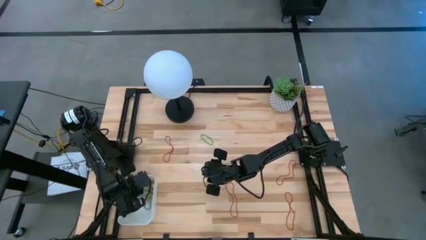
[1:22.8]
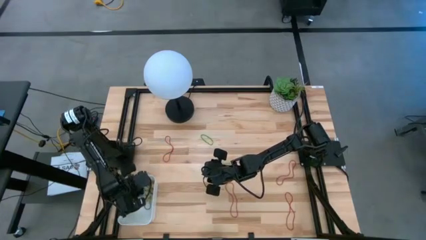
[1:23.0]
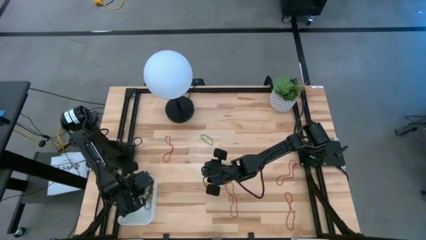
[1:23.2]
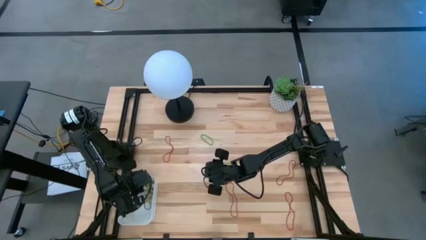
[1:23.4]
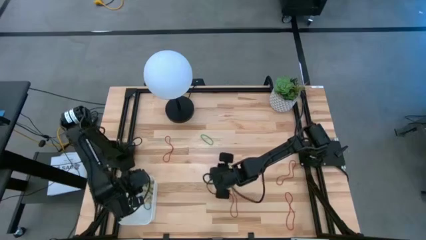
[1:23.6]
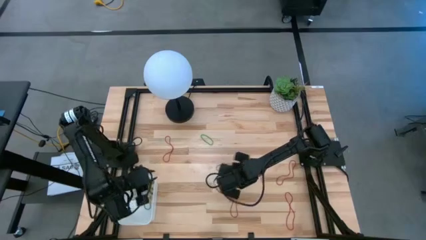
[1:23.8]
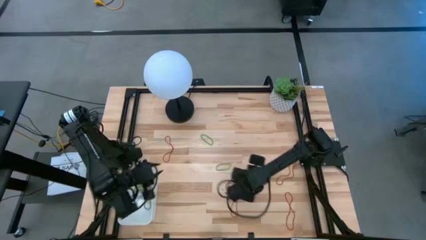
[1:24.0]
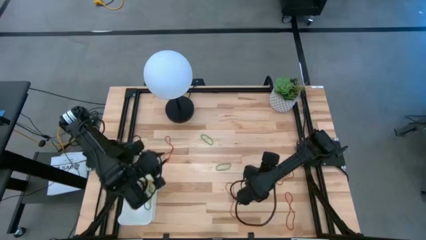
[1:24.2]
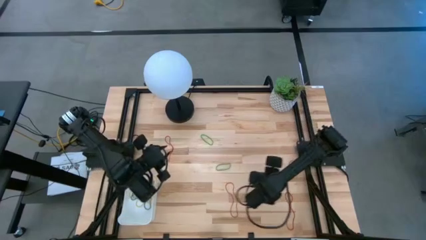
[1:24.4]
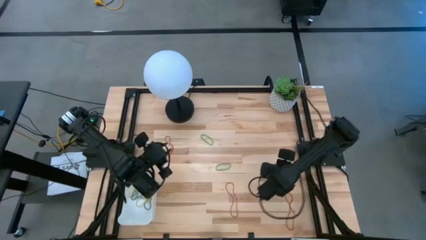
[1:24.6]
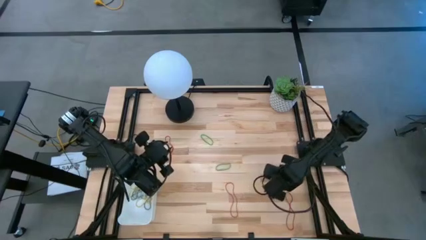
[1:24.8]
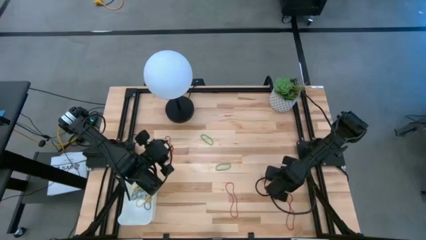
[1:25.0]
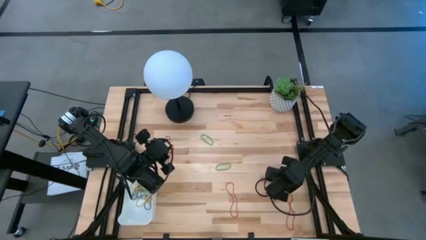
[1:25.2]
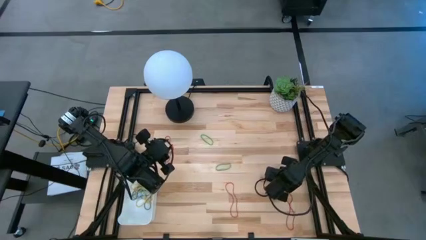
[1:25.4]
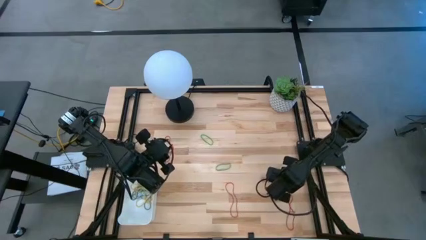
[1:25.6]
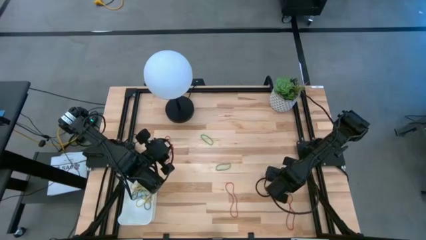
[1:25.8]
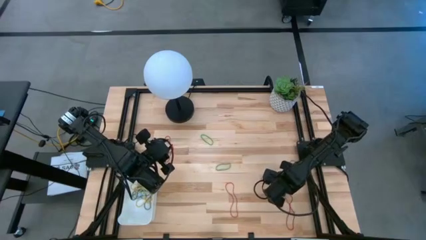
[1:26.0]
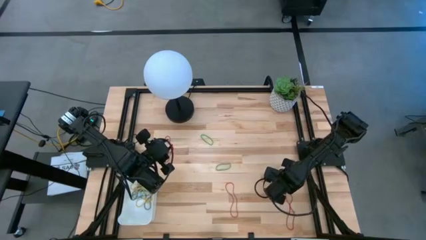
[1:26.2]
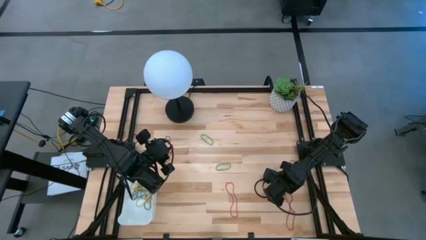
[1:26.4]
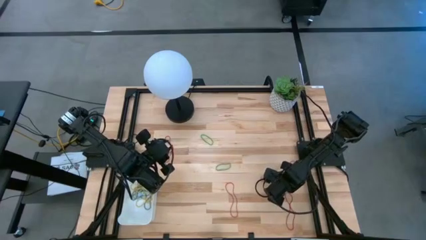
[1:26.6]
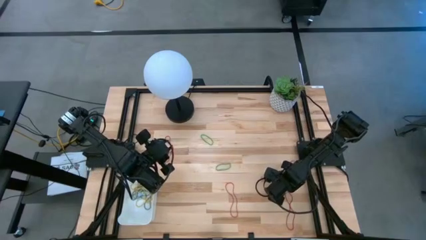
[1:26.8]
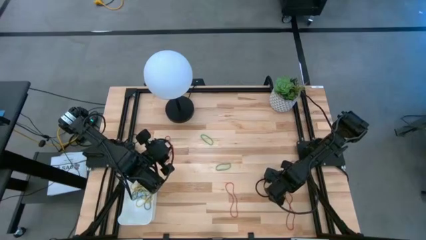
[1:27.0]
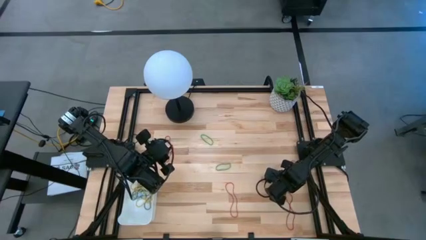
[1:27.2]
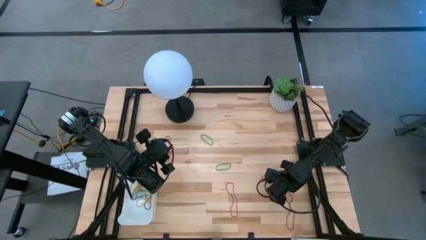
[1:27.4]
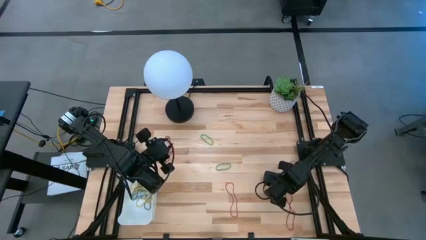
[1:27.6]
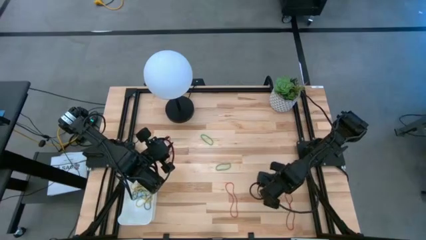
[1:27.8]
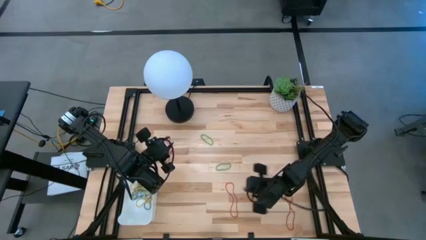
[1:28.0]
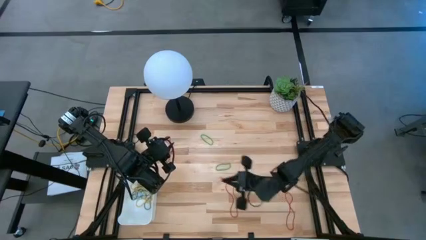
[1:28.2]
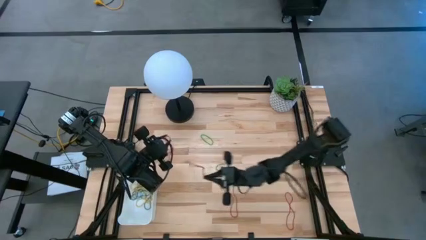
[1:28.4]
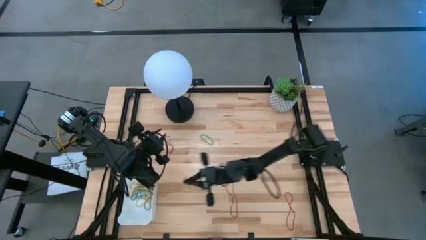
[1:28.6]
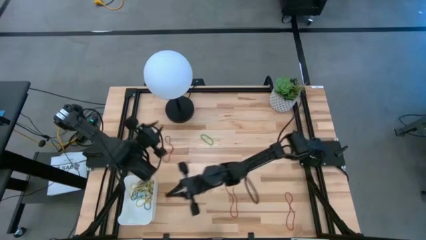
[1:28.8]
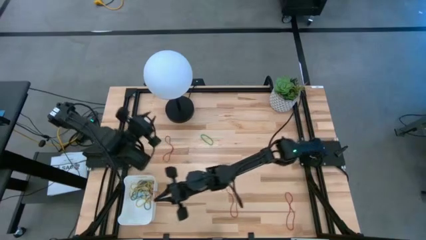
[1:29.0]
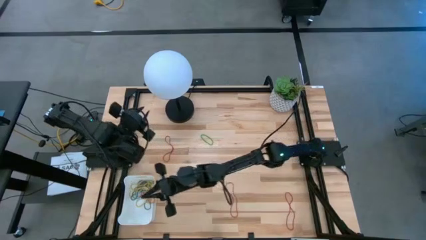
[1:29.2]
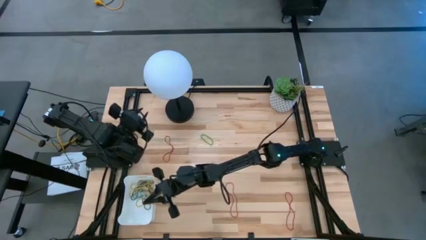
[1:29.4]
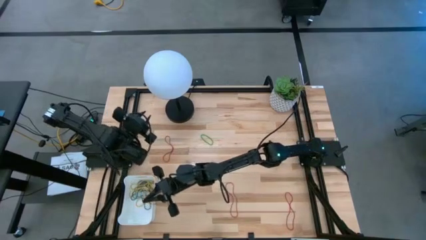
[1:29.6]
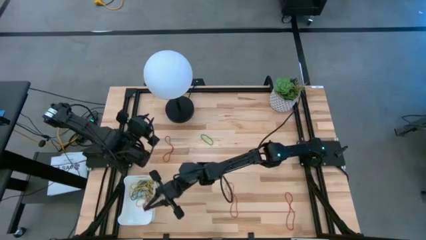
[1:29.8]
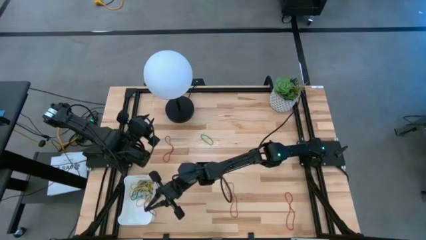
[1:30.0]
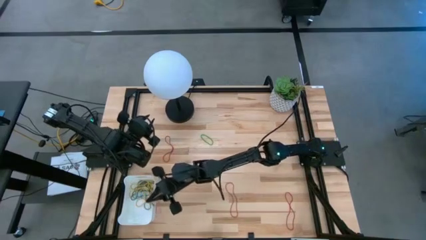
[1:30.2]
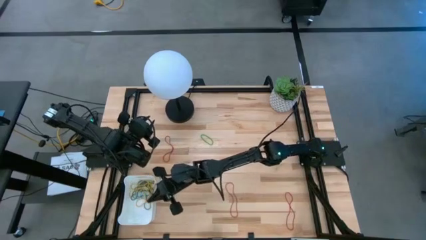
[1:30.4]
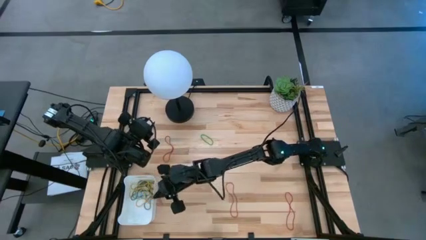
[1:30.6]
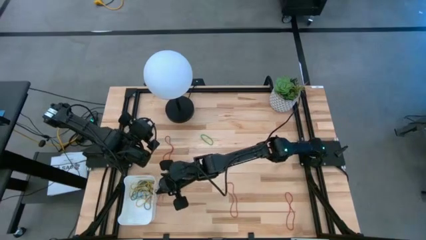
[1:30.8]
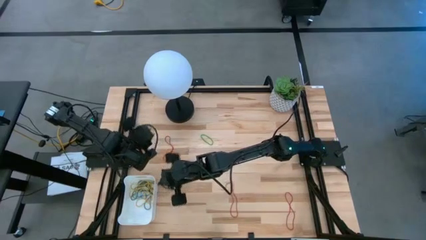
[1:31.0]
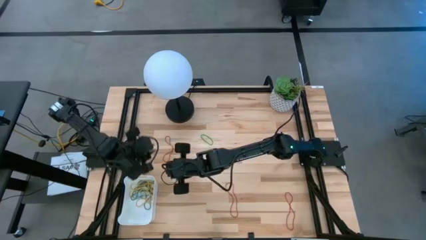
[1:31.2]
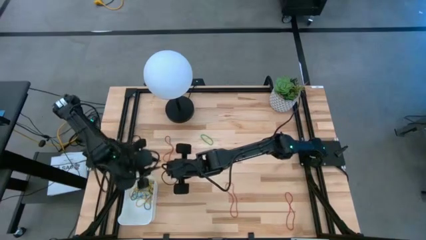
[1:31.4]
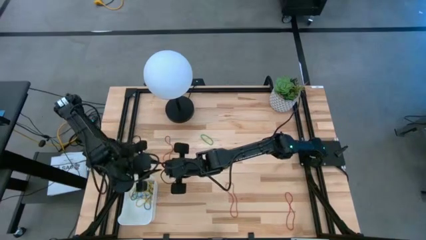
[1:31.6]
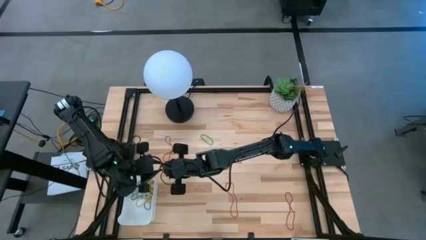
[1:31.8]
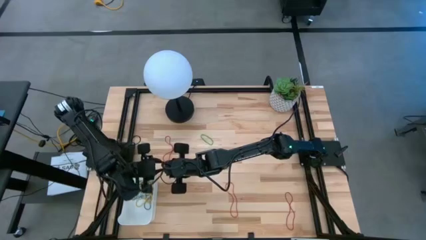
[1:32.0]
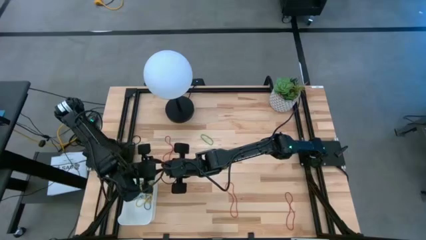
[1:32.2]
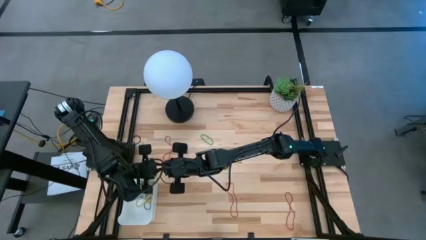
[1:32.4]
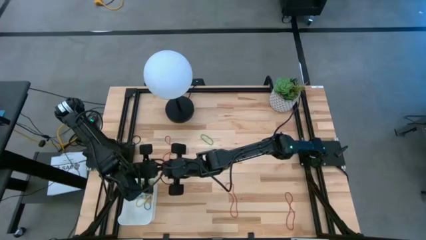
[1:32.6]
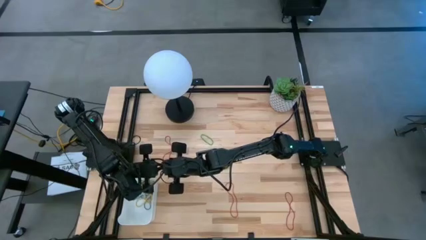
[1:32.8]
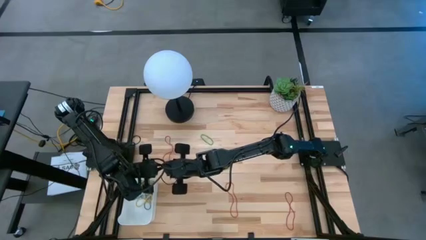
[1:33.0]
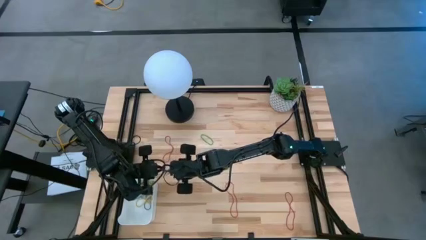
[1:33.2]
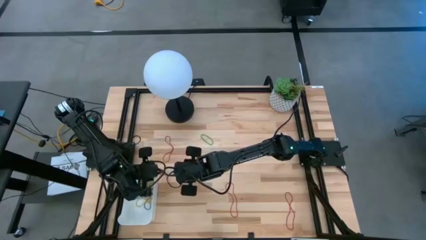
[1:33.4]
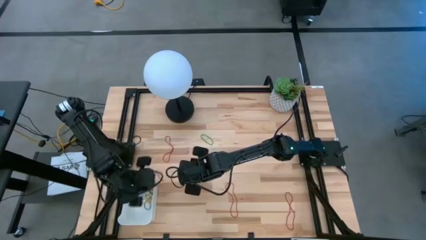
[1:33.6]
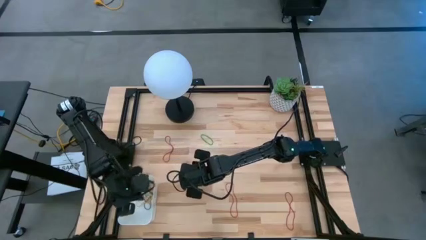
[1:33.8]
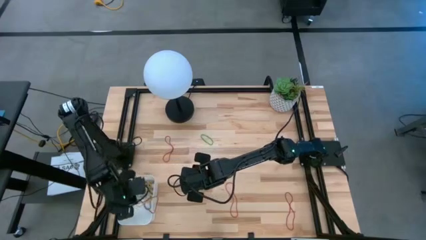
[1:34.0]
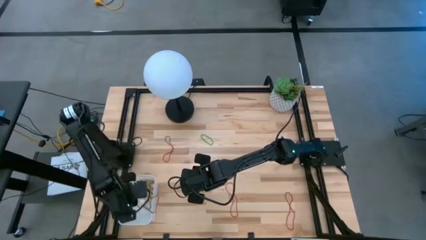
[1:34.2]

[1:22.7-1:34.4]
Task: Pick and place items into bin
Put the red rubber band into the white bin

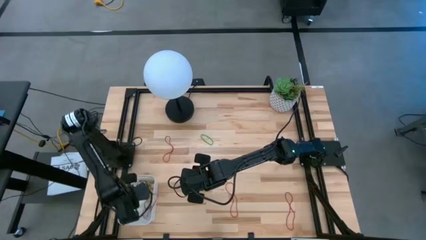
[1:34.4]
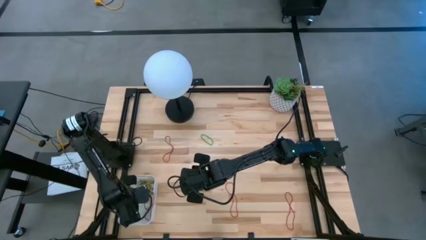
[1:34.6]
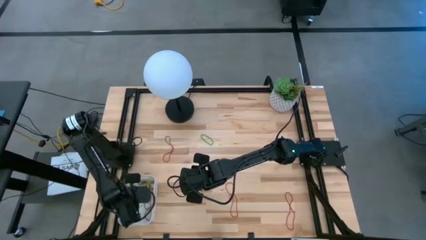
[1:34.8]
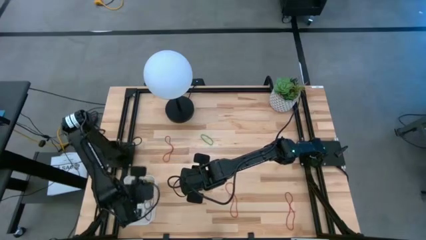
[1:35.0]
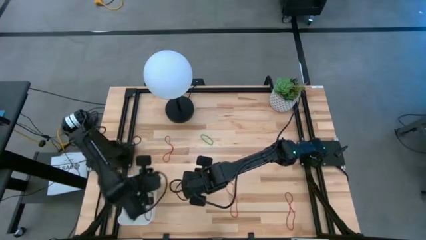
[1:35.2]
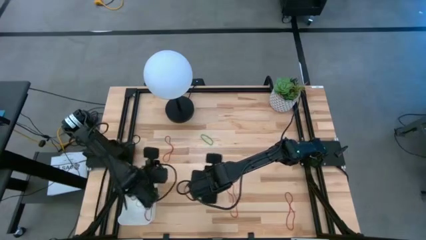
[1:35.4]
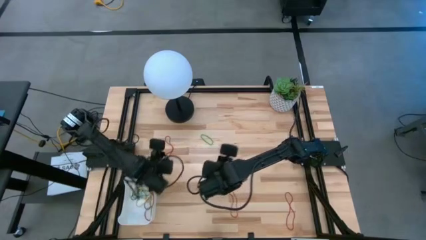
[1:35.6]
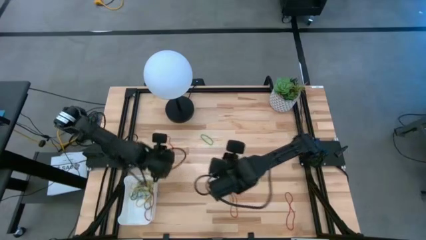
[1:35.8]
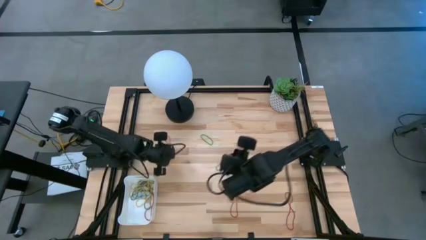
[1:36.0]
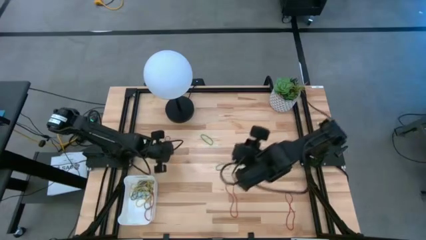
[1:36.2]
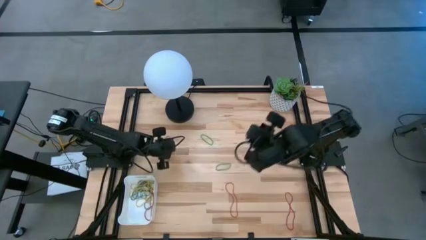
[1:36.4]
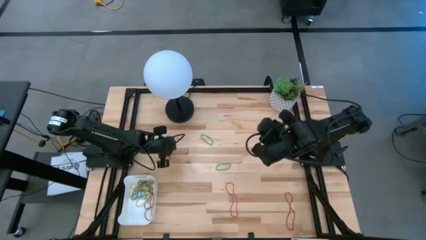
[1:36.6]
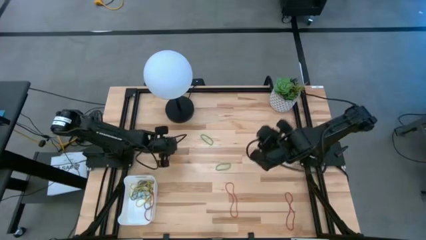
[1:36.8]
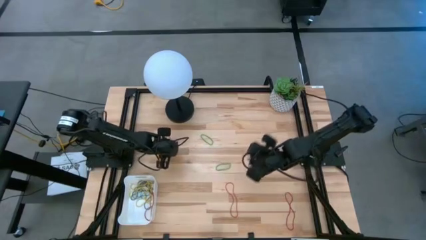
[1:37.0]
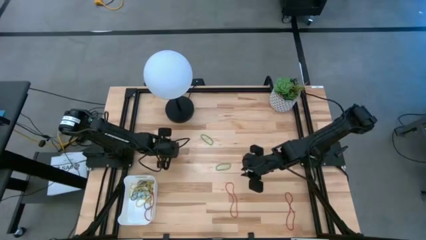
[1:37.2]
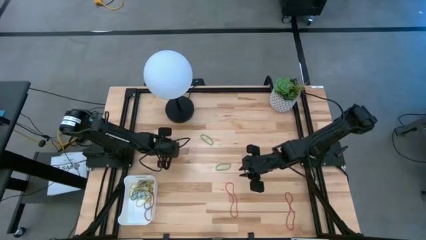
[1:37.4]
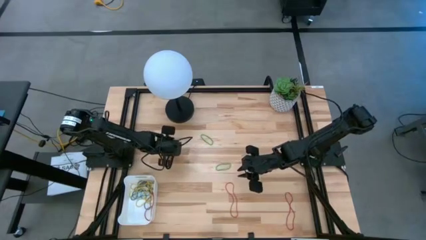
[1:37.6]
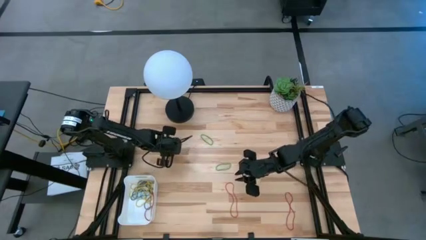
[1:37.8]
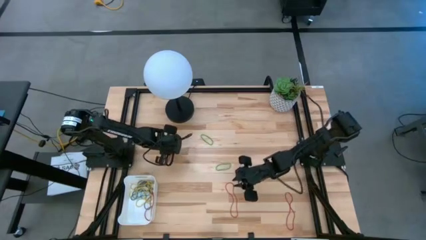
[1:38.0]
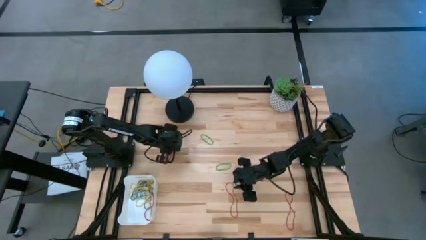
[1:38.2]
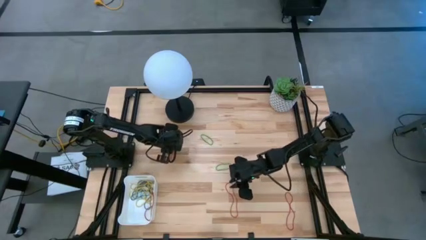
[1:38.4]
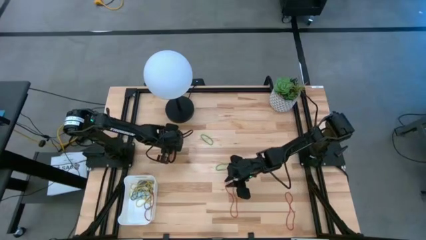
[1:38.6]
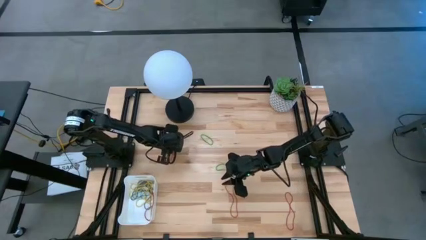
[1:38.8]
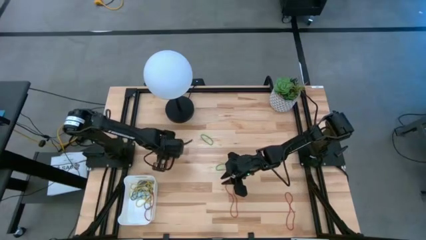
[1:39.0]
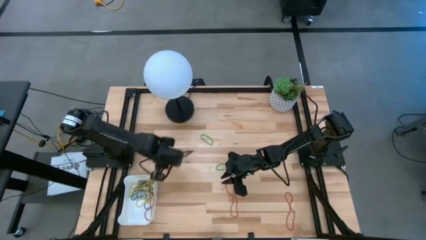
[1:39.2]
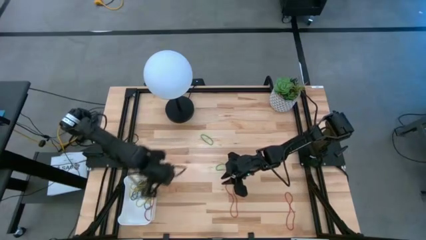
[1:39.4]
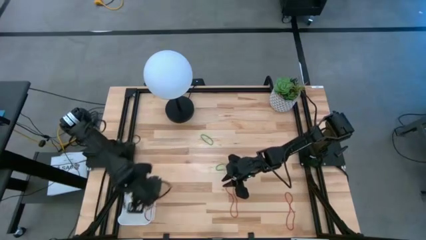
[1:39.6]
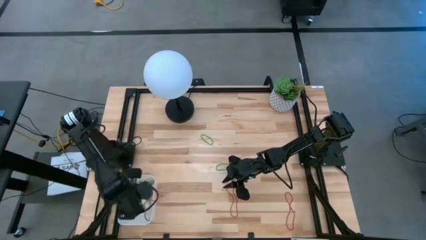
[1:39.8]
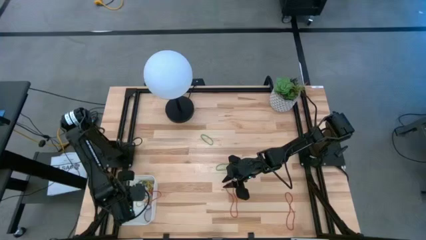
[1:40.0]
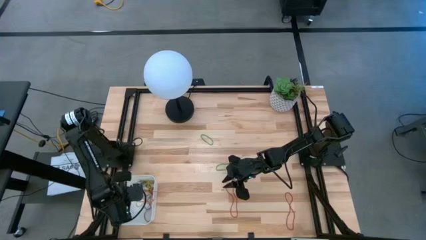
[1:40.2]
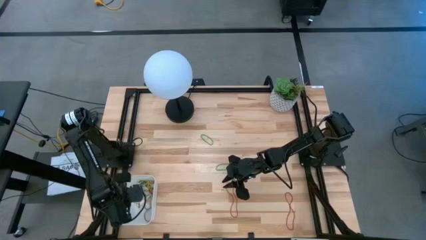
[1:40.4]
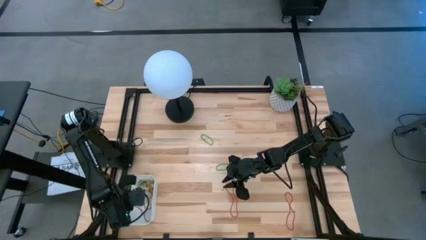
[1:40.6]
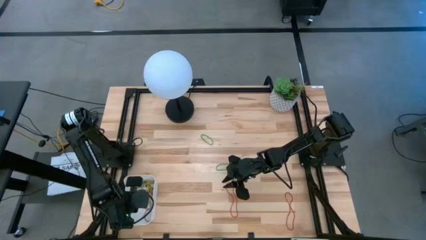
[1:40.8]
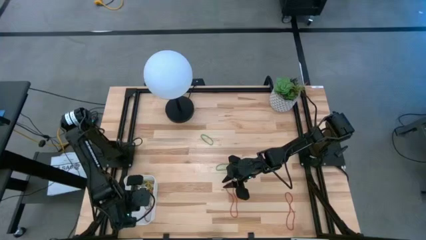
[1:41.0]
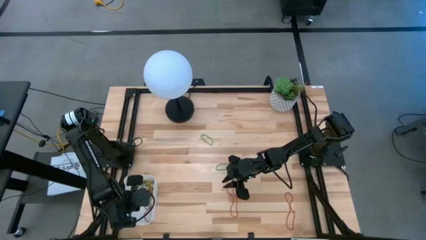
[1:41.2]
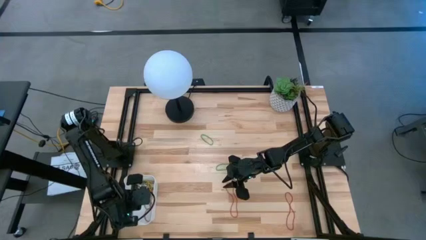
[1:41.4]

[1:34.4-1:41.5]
Put the top red rubber band into the white bin
